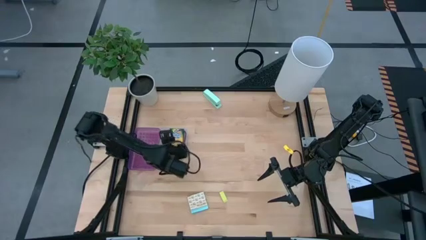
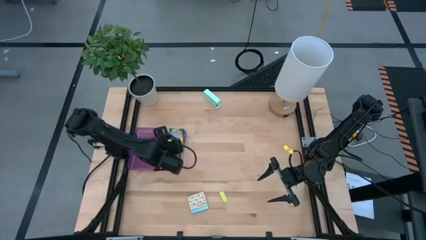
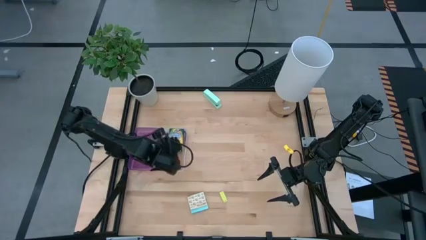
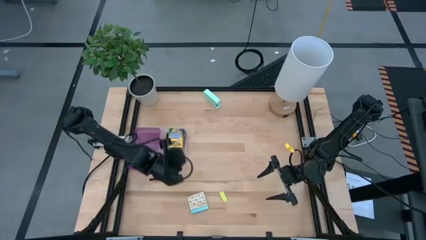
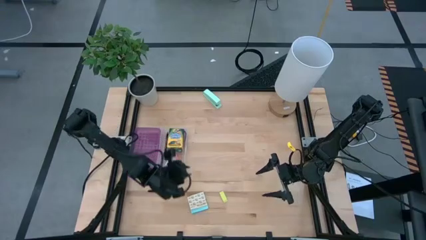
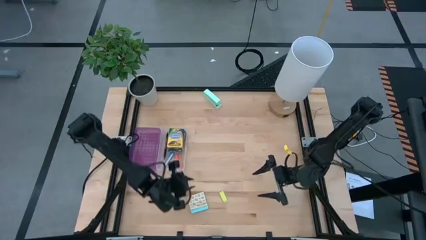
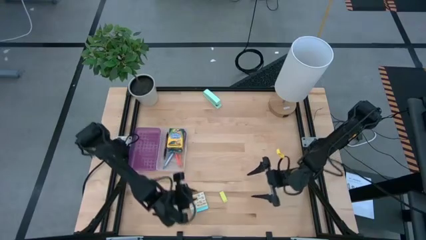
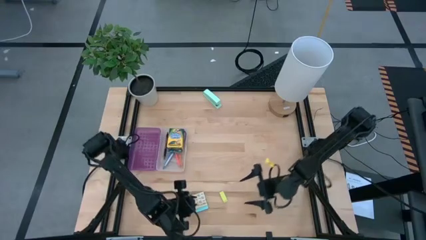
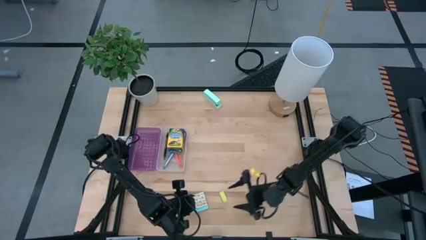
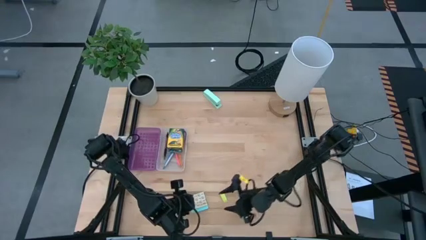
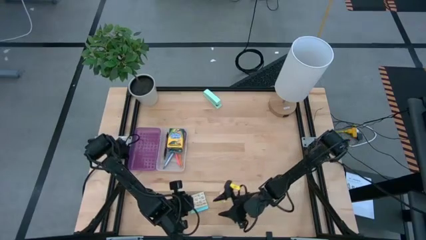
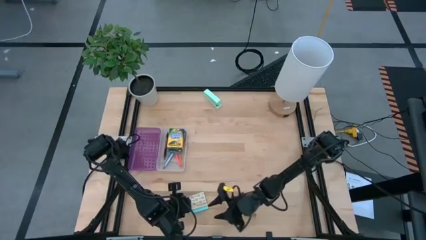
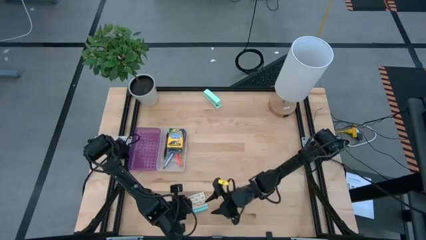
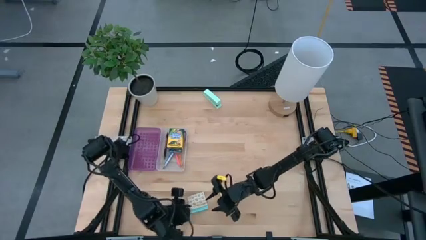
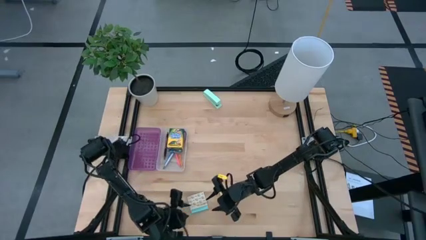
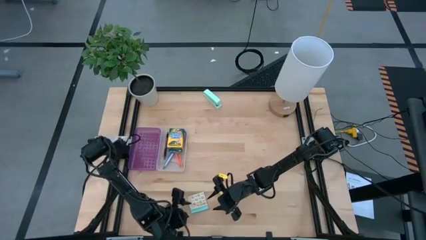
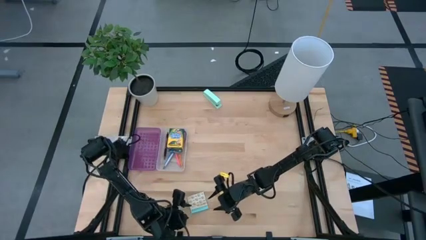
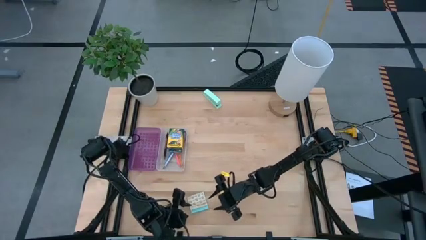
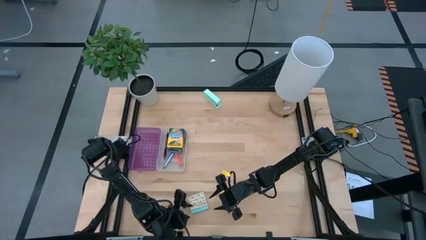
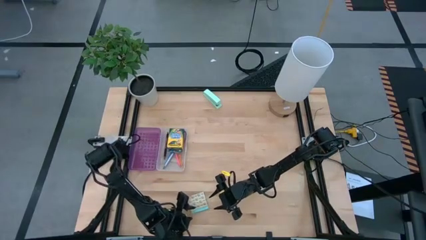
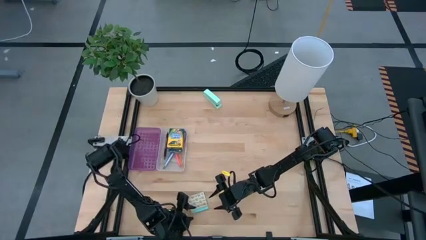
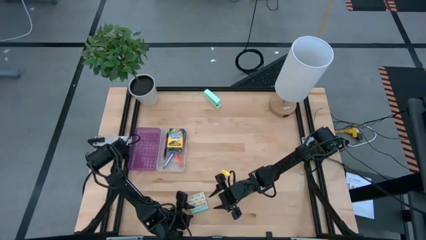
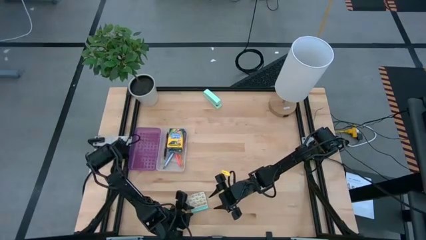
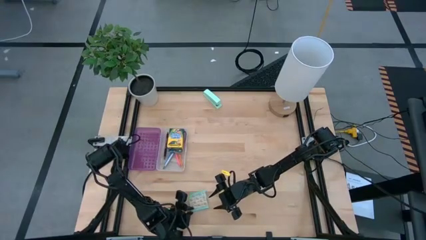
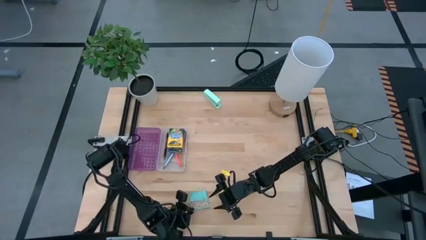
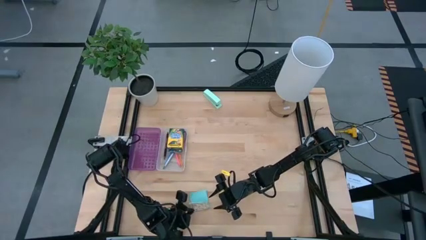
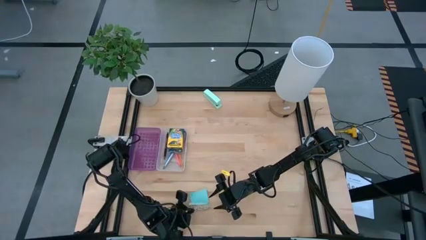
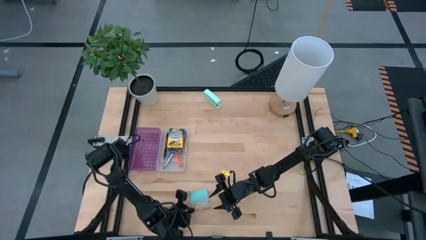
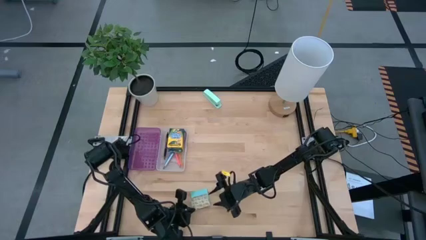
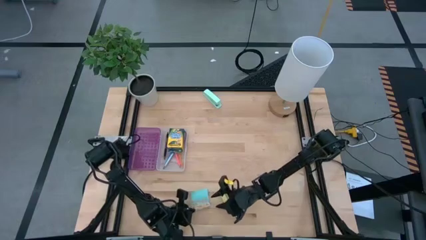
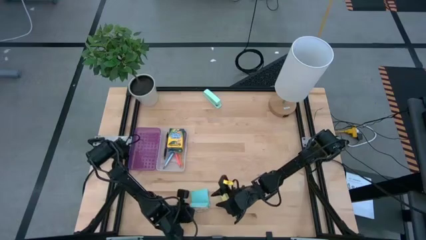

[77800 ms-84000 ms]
Task: Pack school essentials
Put the blue sticky note into the purple supply box

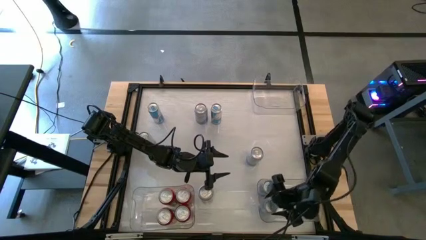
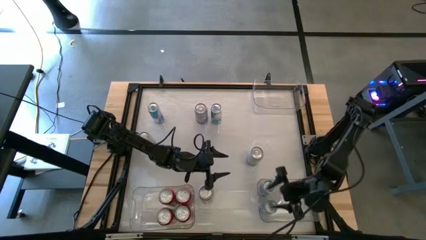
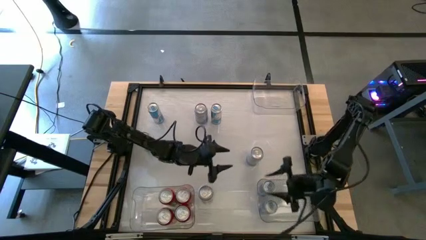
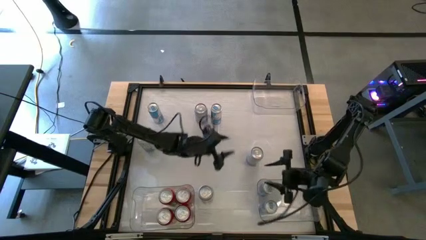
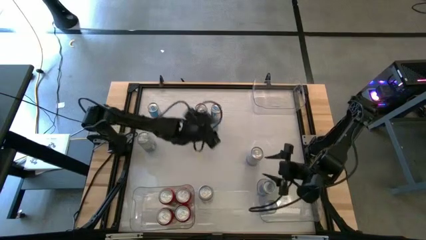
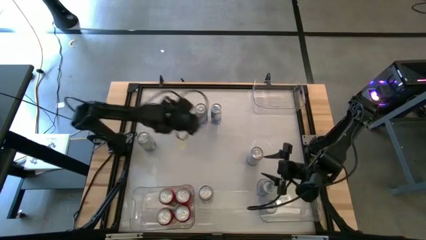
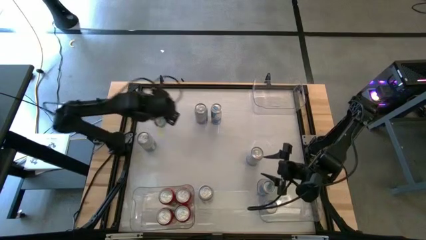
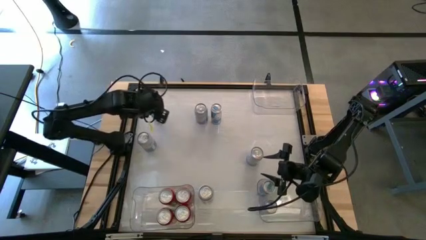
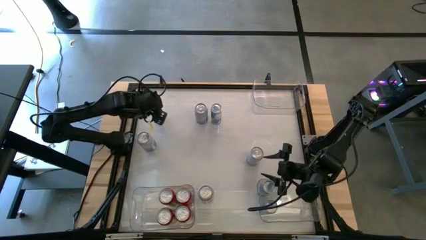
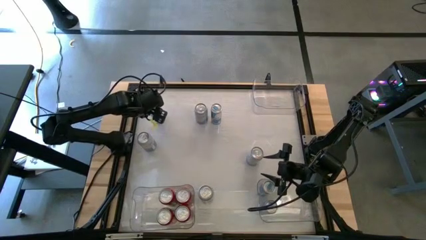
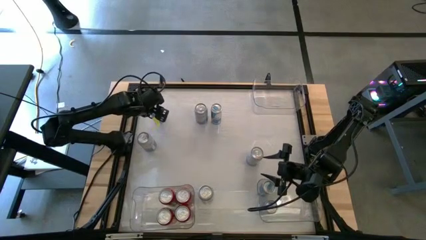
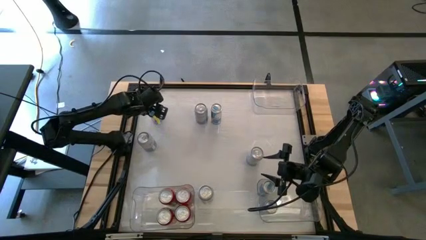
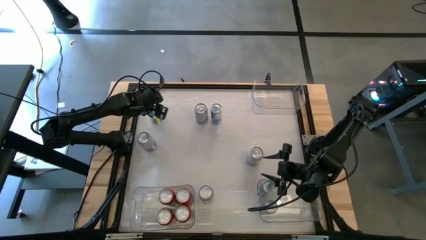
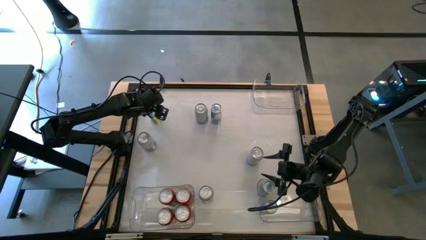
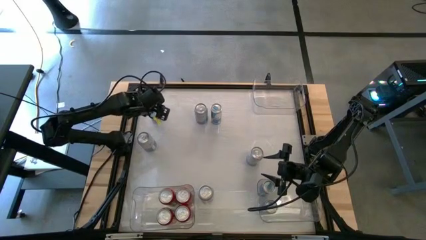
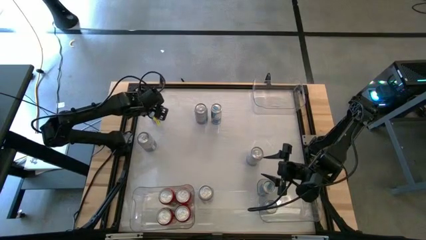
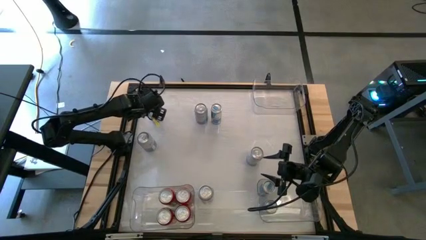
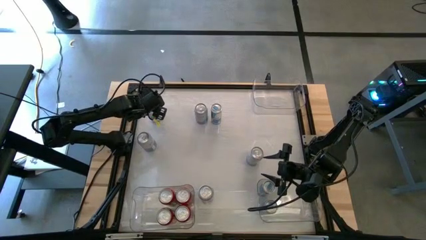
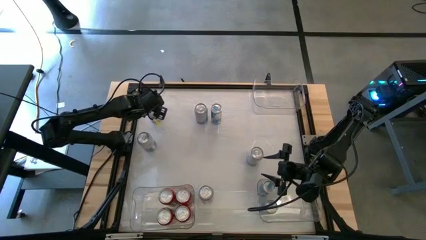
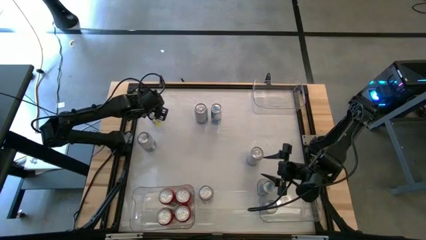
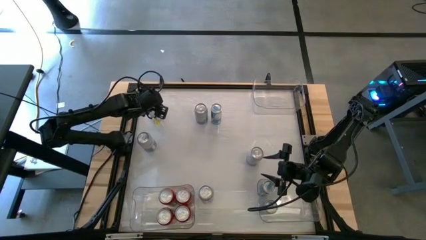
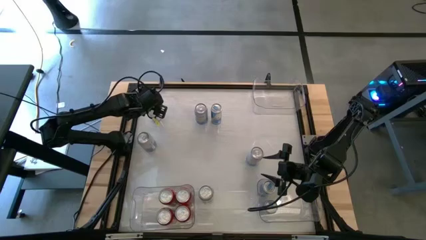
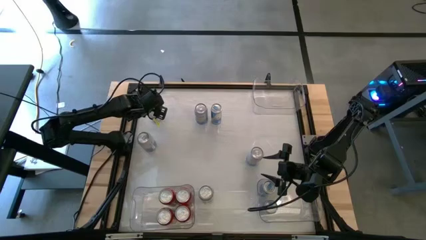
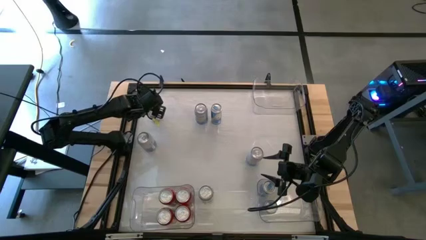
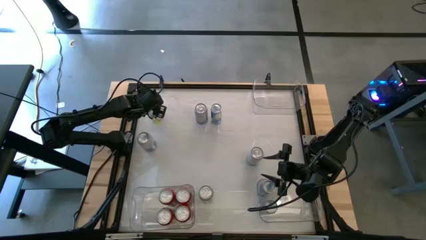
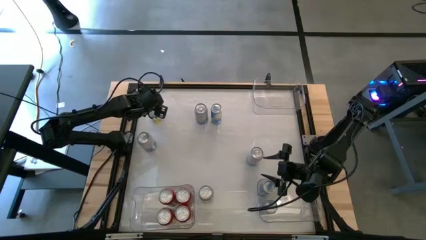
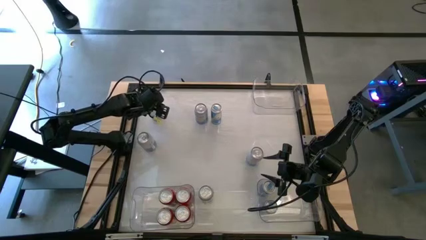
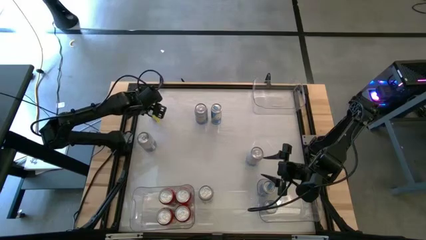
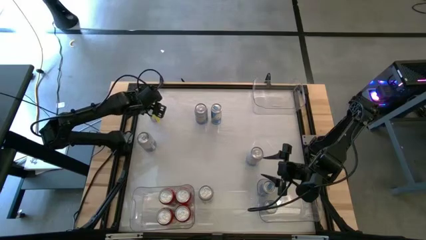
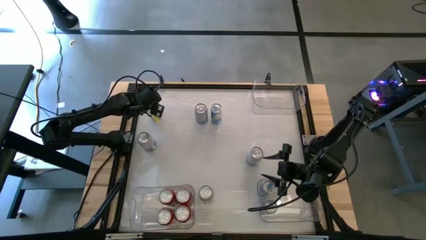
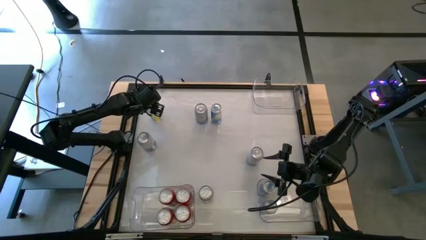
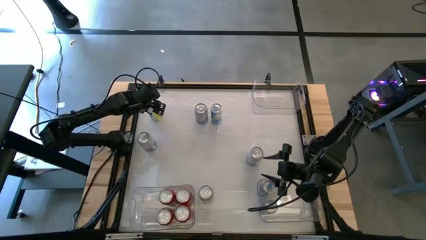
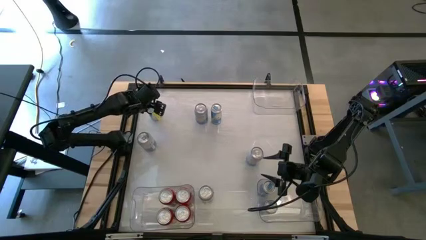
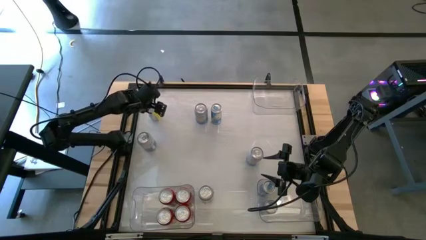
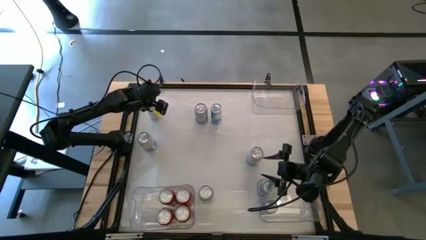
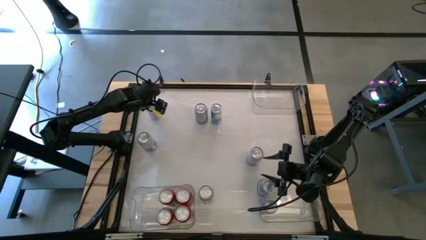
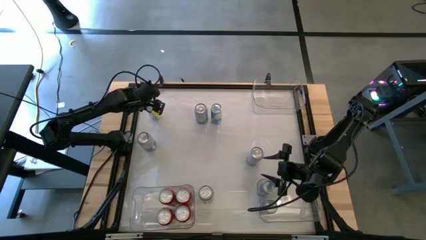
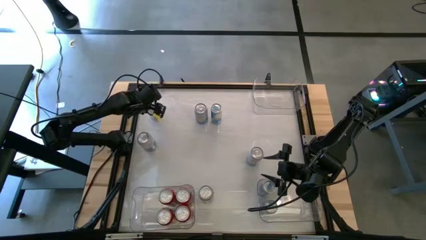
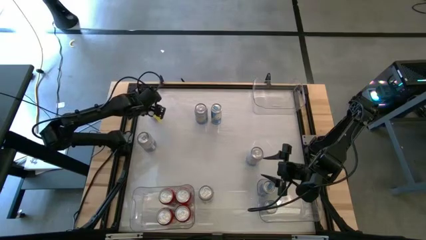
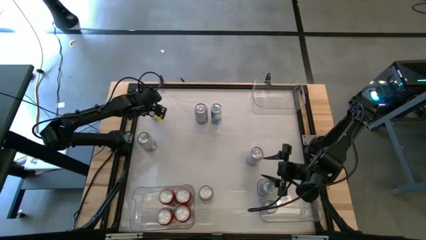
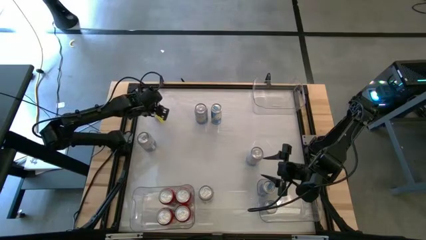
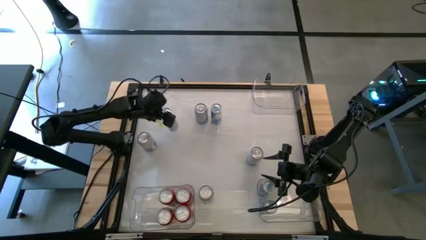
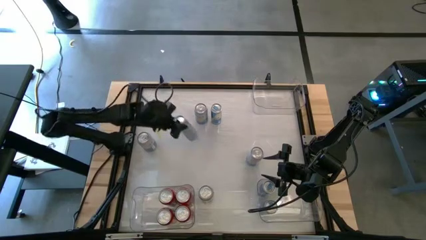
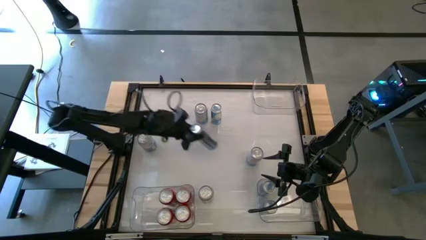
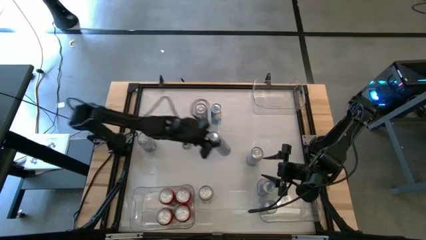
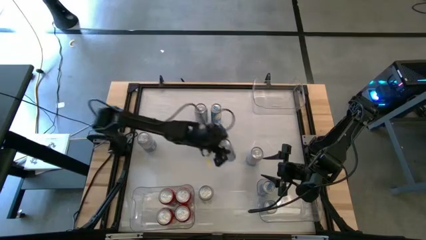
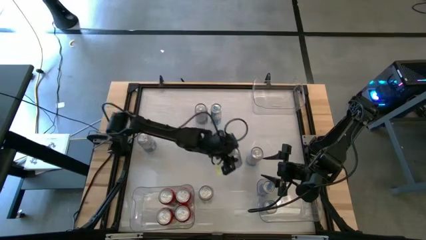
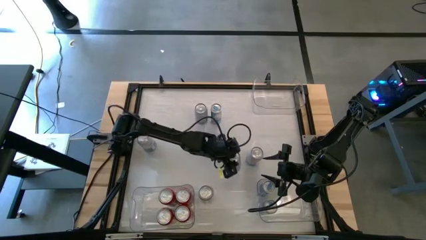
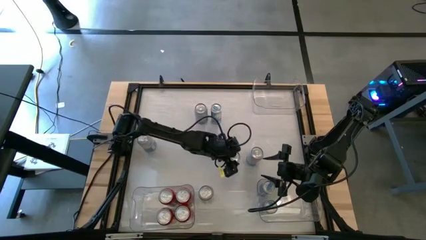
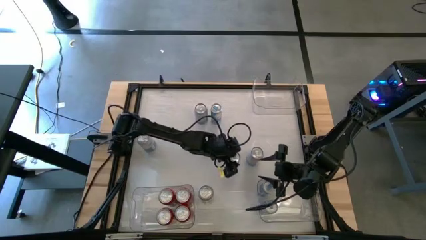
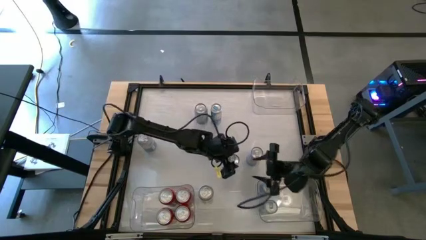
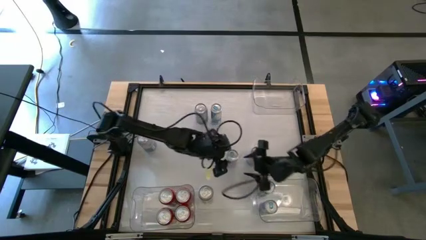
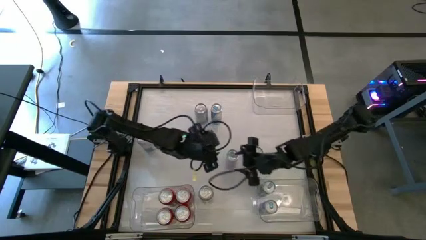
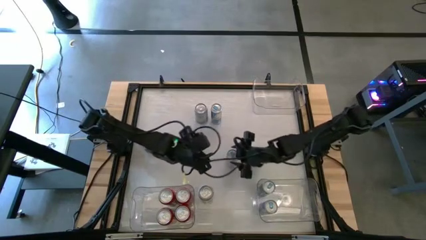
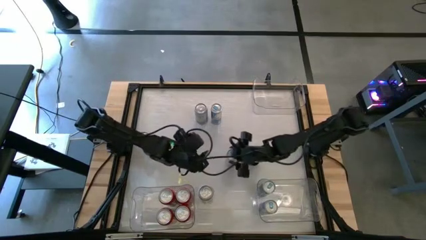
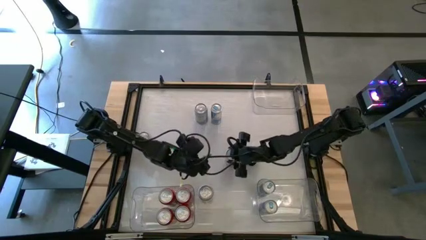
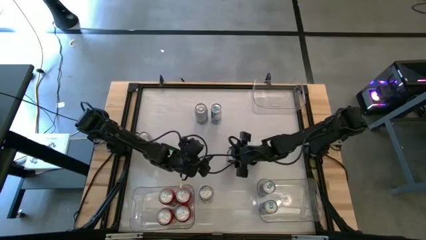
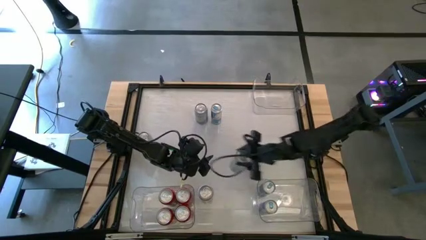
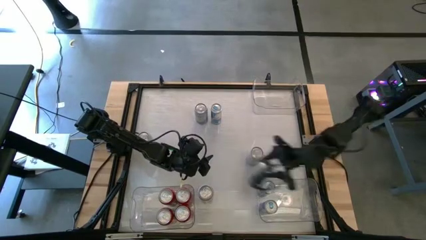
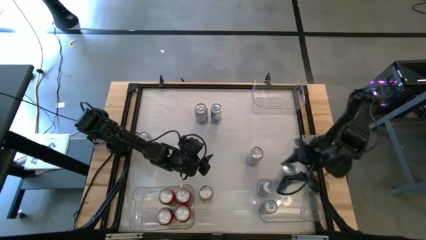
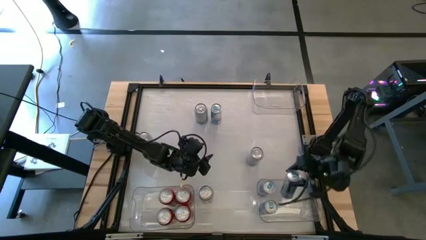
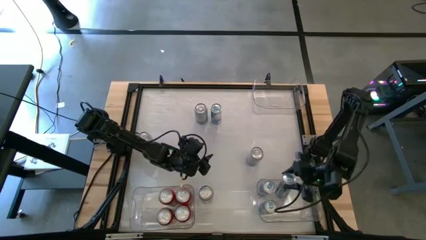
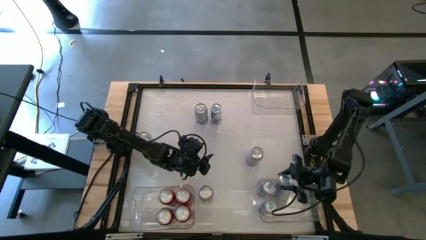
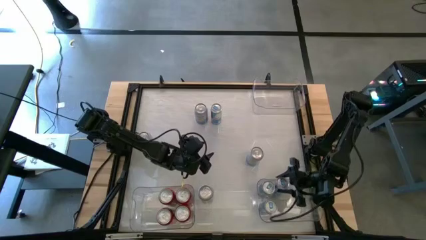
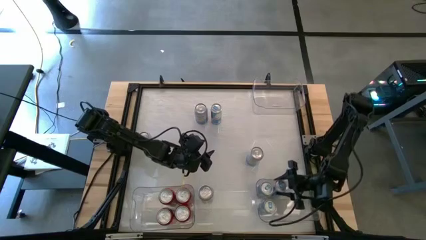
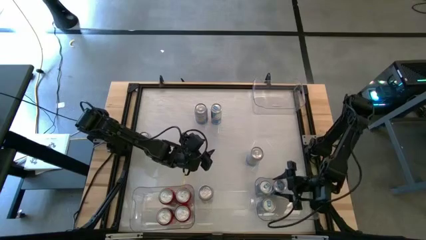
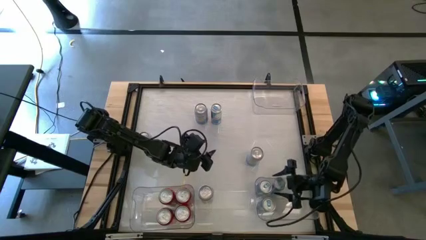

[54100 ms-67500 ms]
Task: Sort soda cans
Put the left blue soda can into the bottom right transparent bin
